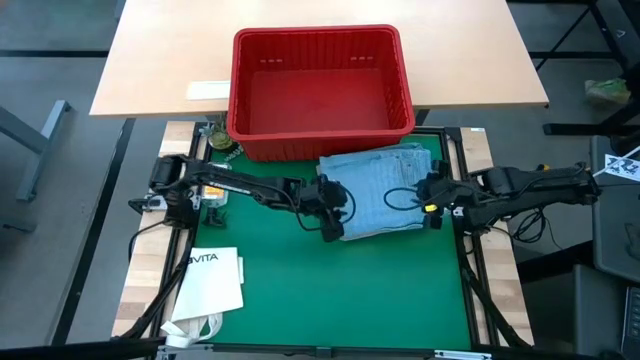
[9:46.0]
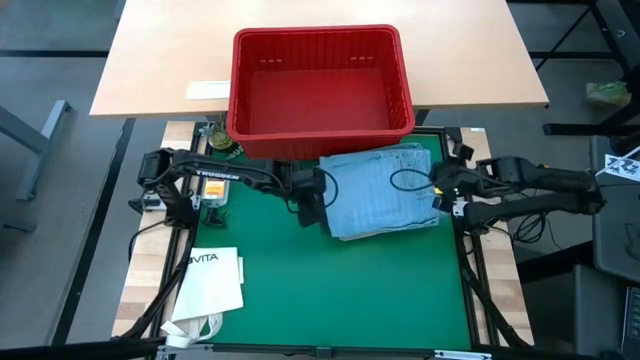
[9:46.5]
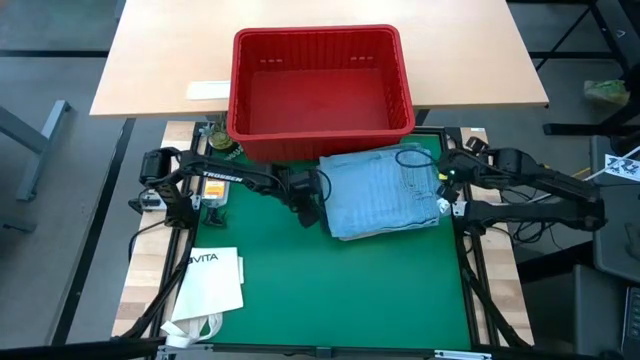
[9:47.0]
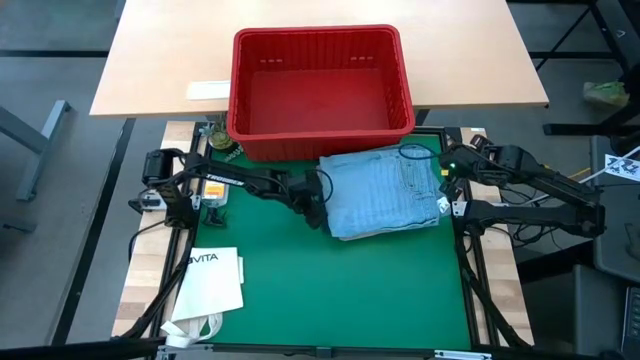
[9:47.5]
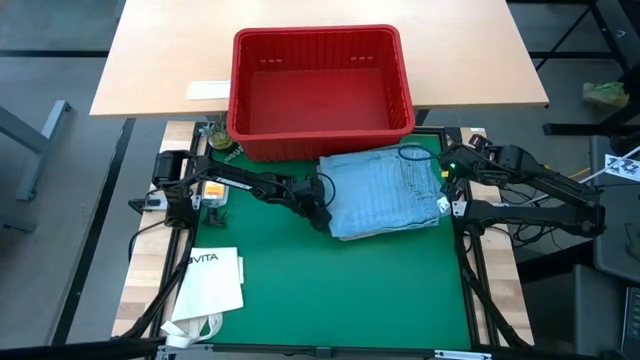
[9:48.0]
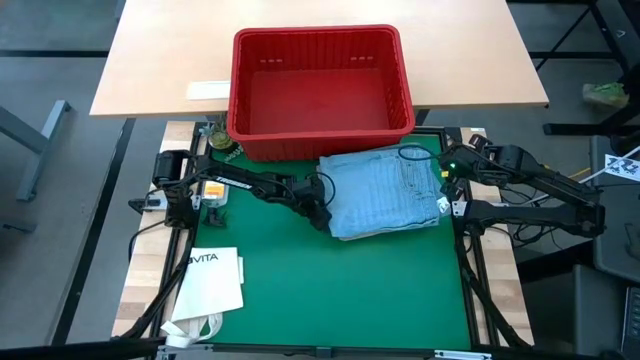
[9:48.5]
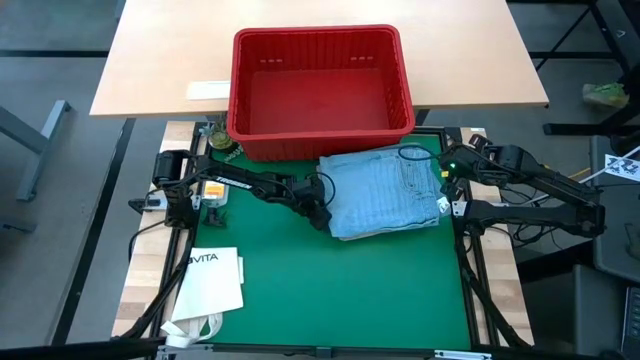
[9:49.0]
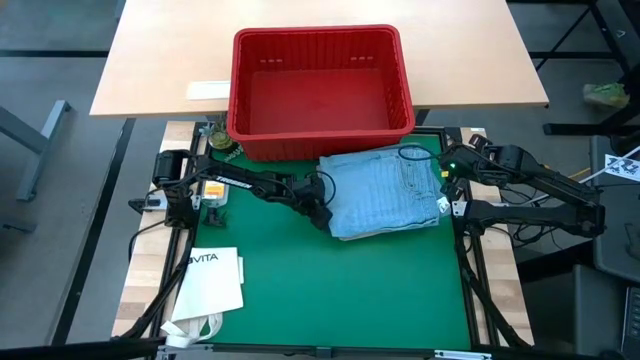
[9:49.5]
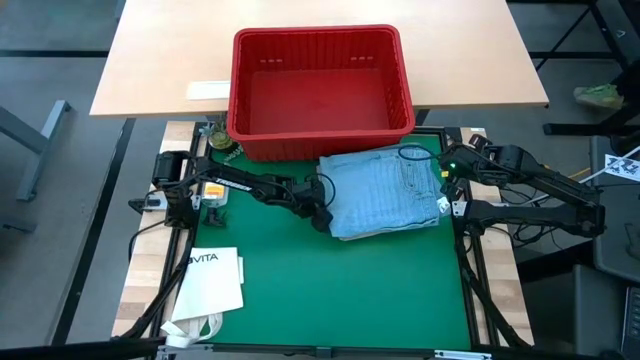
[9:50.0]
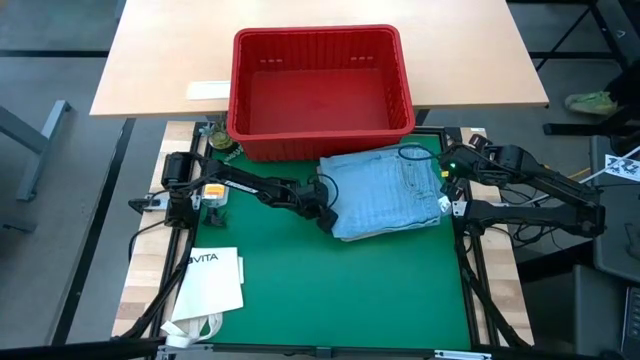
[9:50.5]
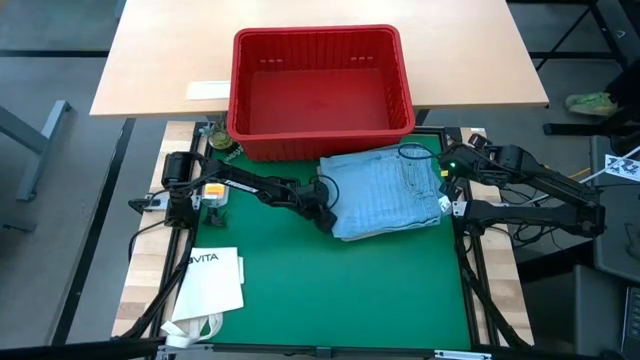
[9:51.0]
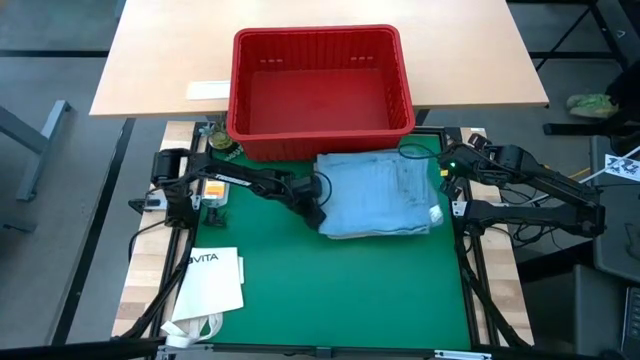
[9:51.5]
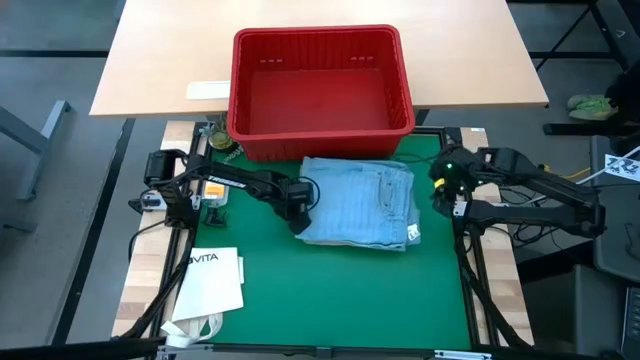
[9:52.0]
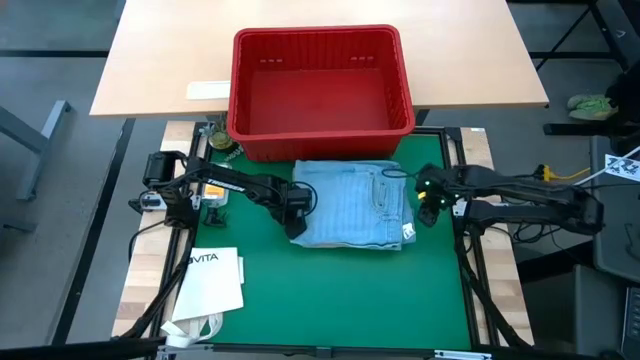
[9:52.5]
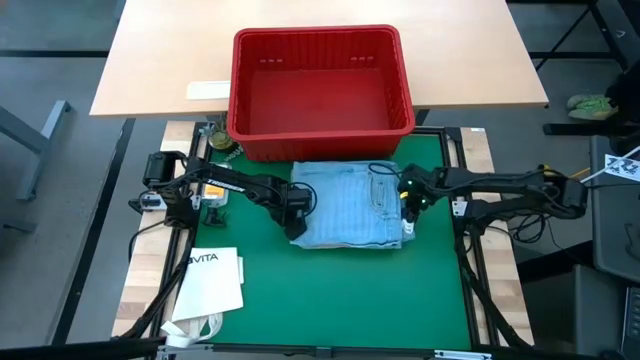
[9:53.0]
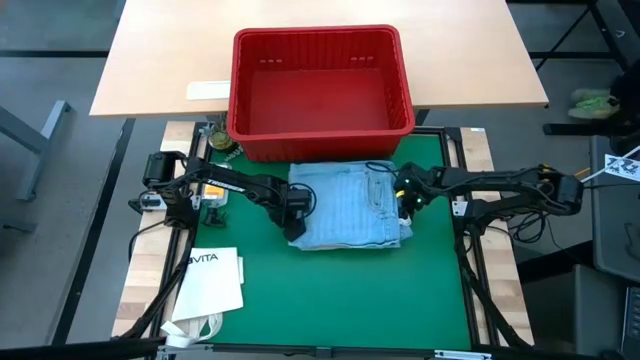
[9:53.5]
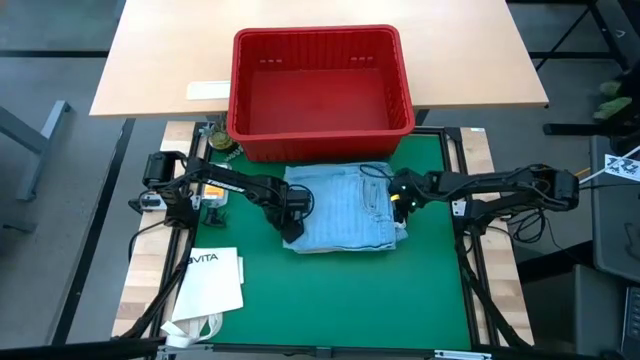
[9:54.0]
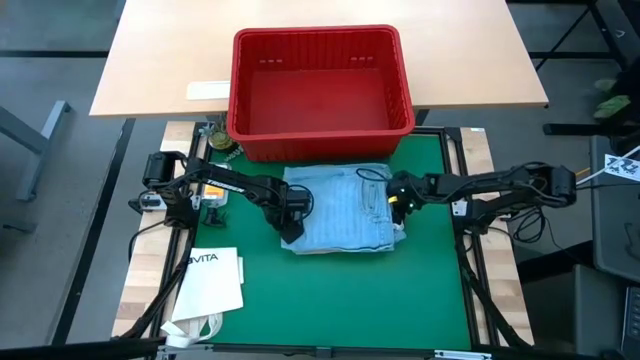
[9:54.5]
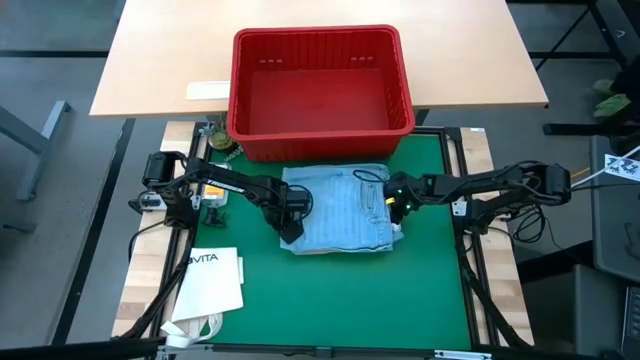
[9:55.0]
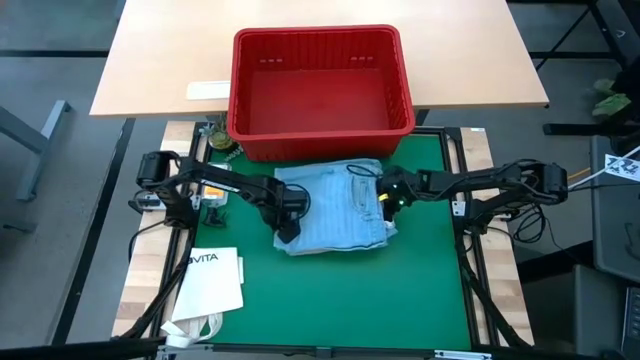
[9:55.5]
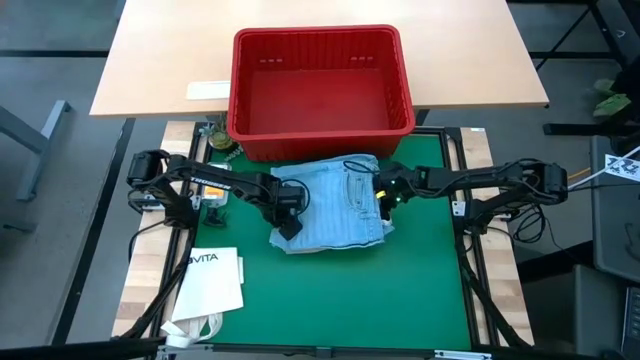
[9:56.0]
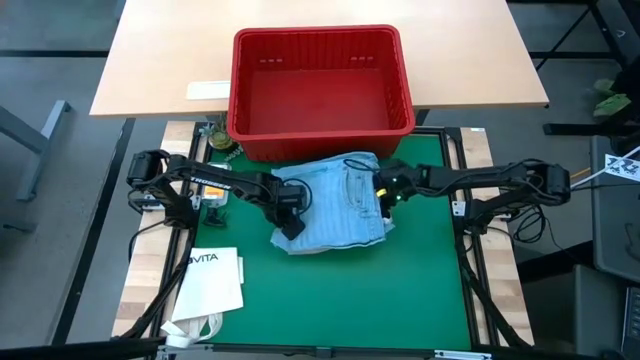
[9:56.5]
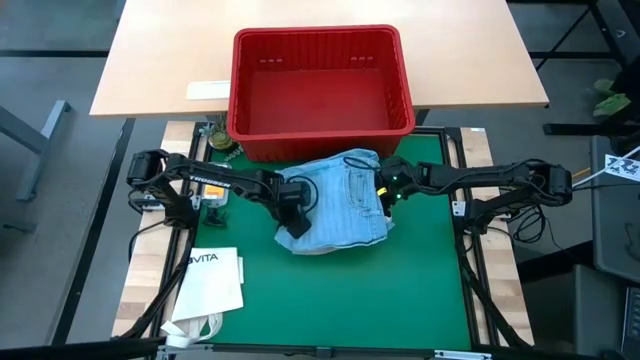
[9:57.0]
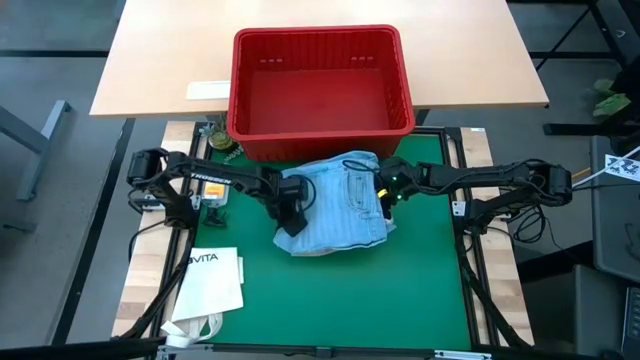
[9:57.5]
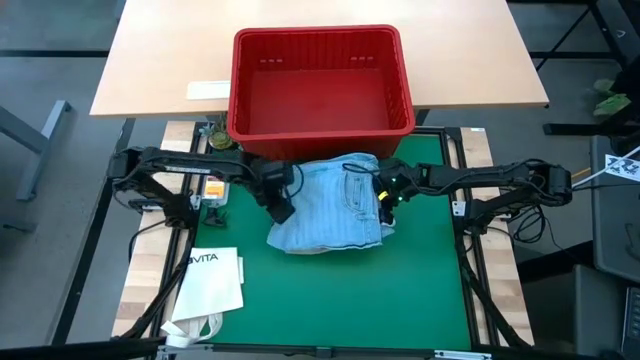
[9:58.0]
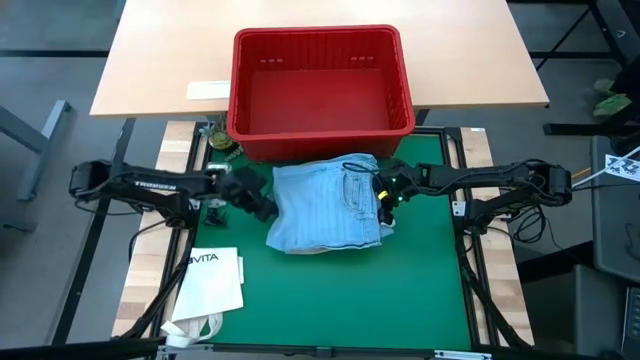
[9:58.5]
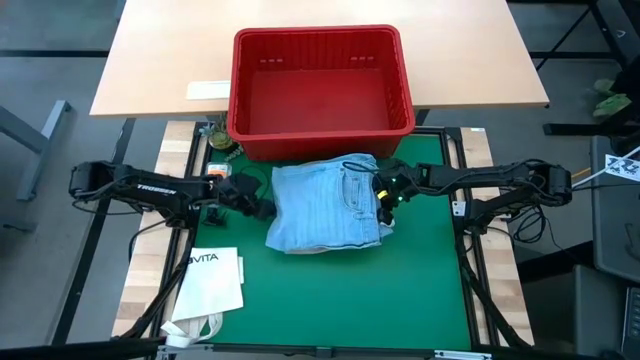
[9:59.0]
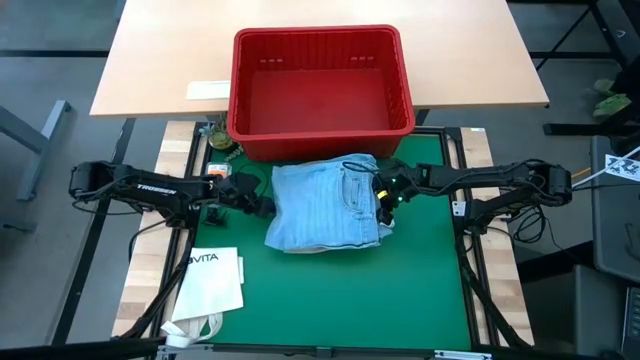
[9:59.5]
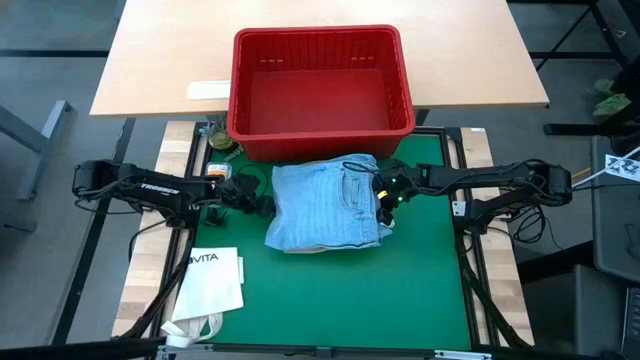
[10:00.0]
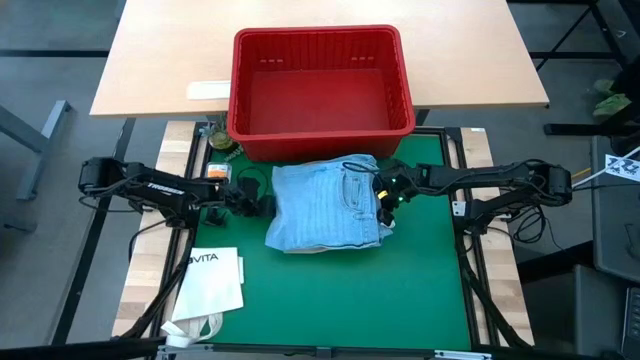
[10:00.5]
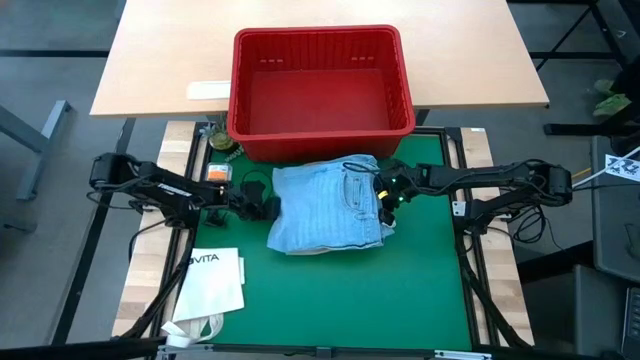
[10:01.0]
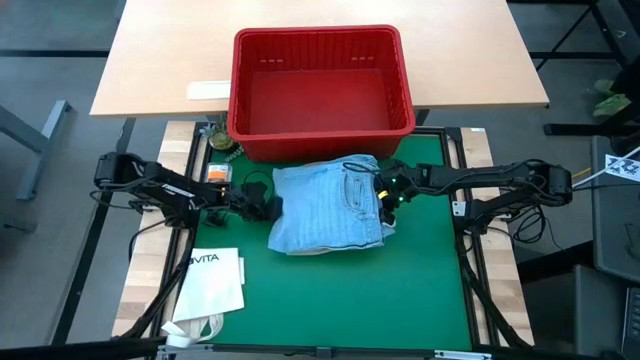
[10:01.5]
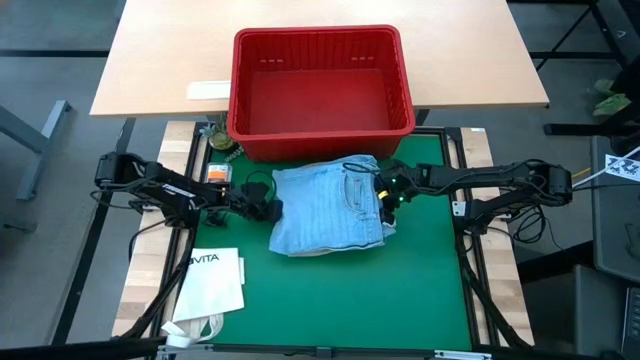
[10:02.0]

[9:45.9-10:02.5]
Task: Fold Laundry from Bin
Put the stacked clothes into the red laundry bin

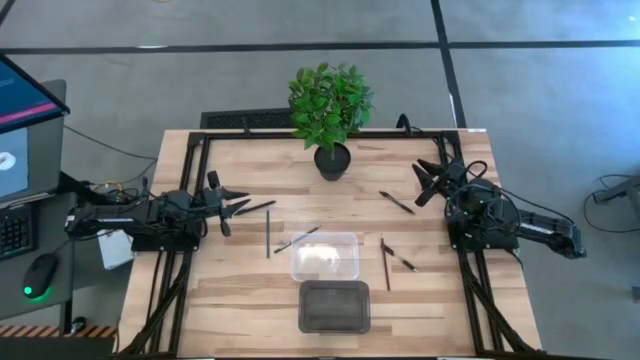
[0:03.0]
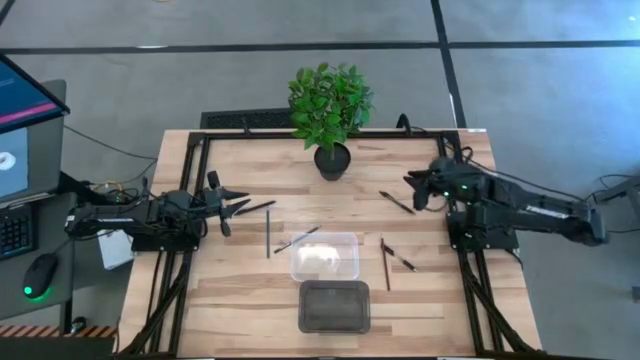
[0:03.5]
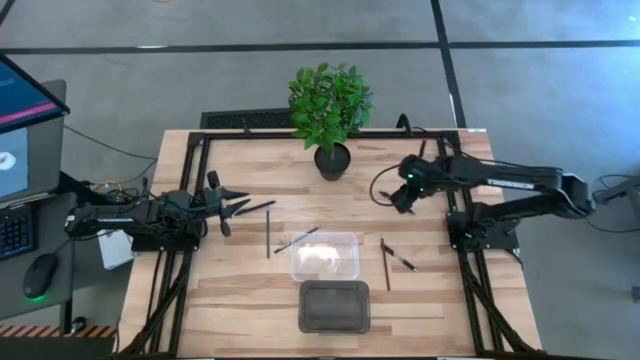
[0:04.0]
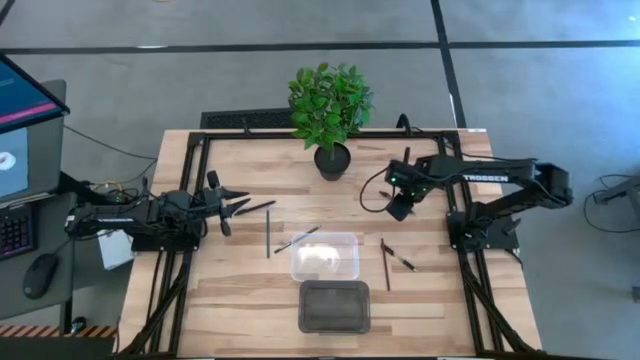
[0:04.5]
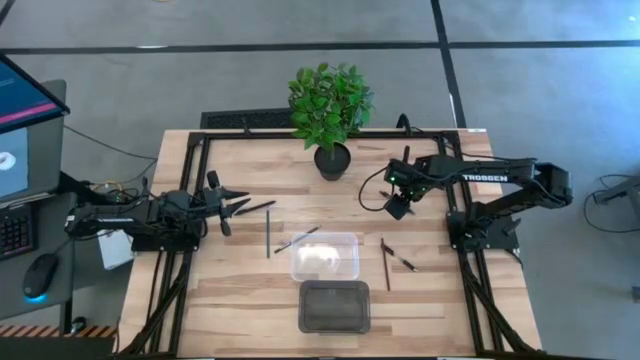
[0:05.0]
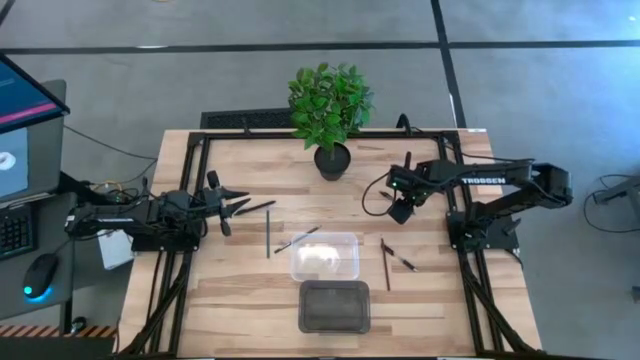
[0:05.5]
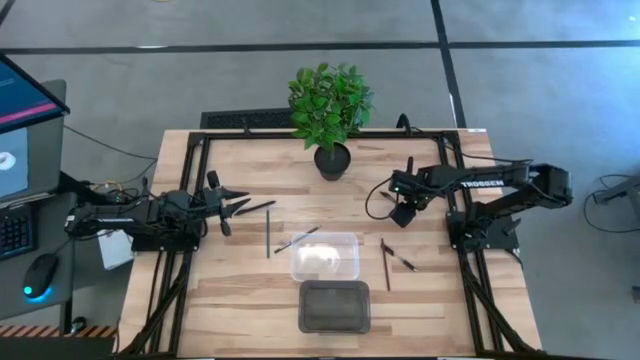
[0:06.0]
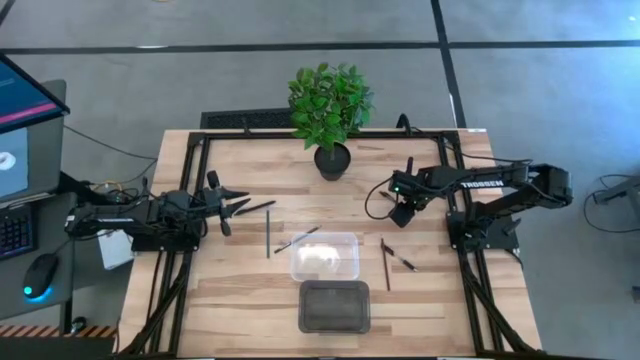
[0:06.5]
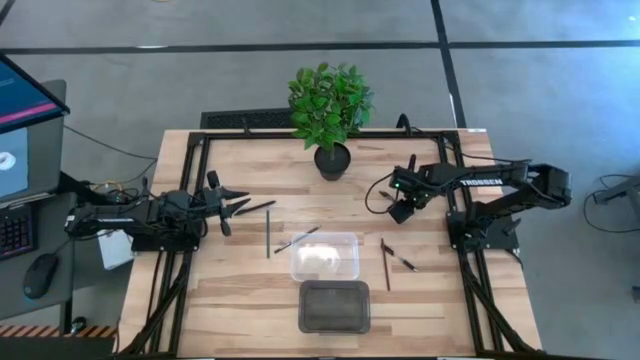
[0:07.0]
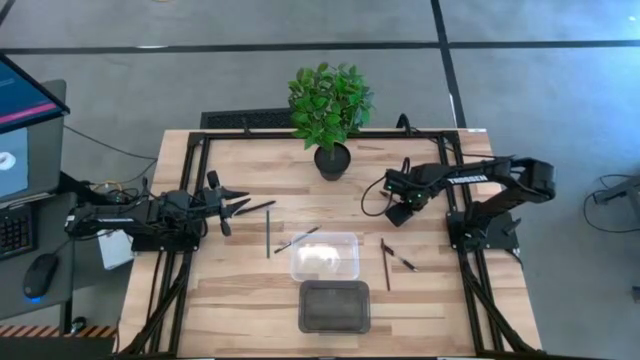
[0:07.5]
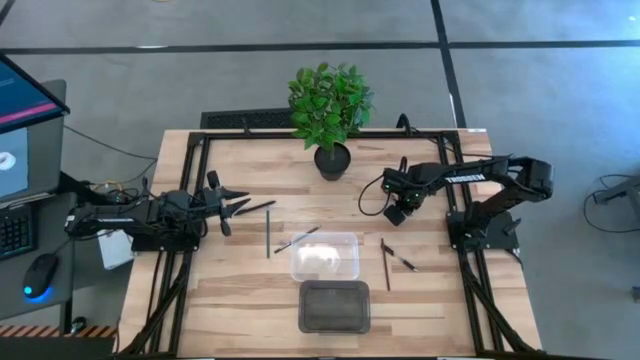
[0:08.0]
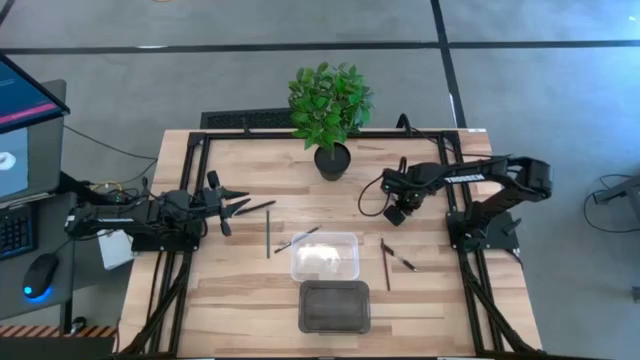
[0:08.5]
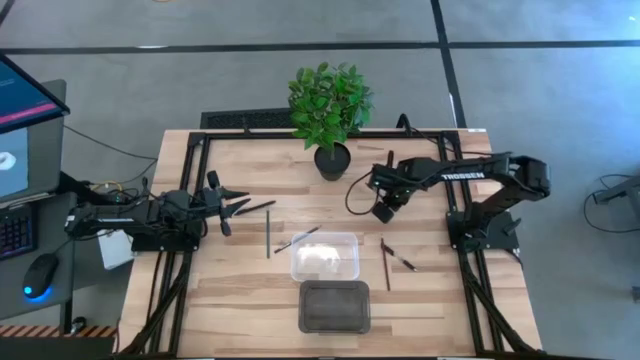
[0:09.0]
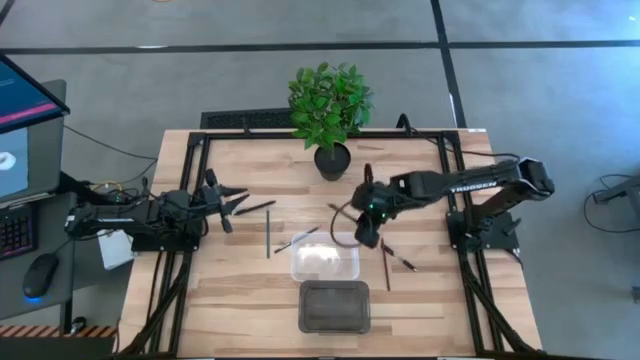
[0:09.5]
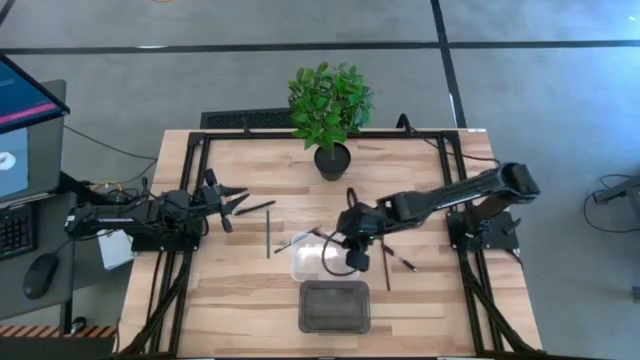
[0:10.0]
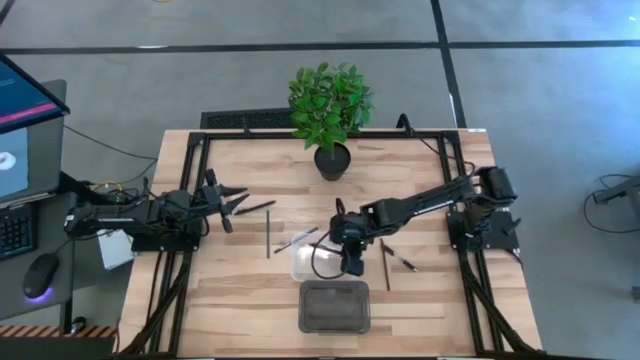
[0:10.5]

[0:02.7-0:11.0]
Task: Sort pens & pencils
Put the top right black ballpen into the transparent bin
